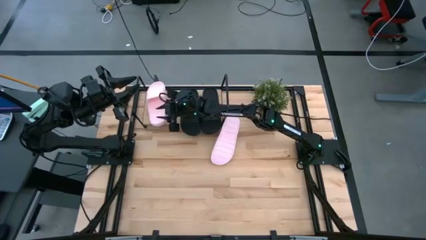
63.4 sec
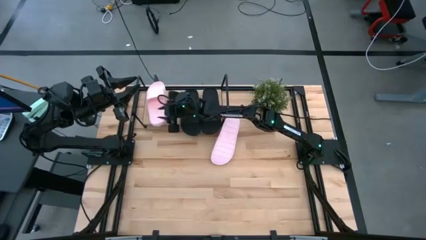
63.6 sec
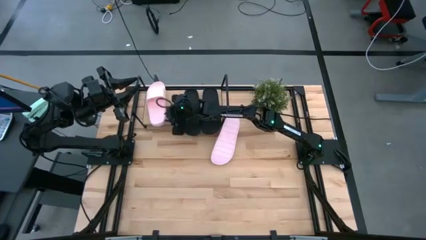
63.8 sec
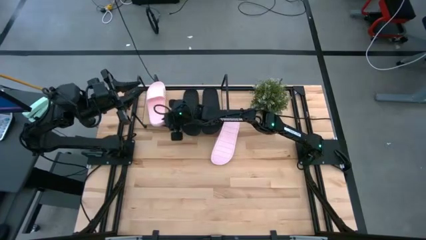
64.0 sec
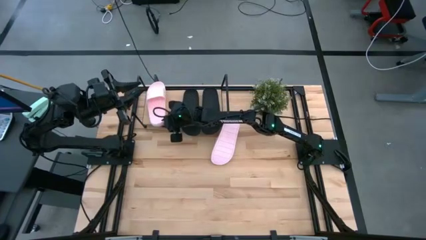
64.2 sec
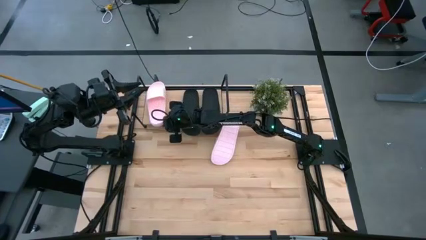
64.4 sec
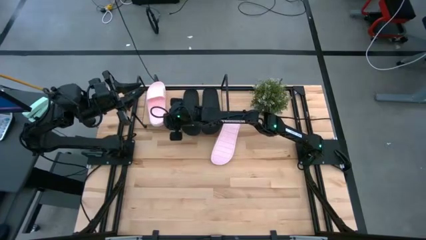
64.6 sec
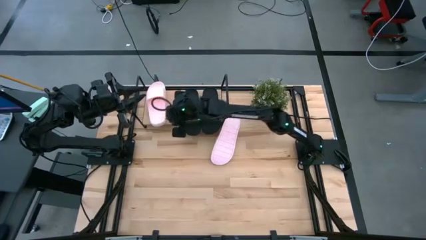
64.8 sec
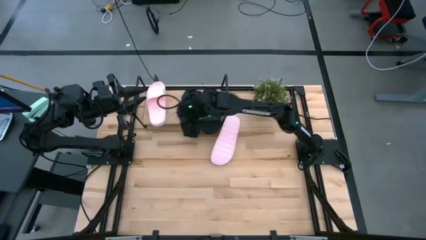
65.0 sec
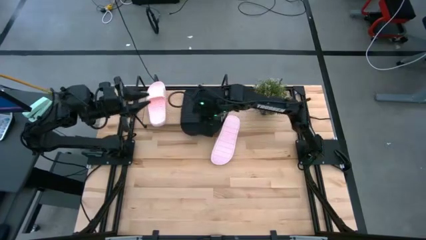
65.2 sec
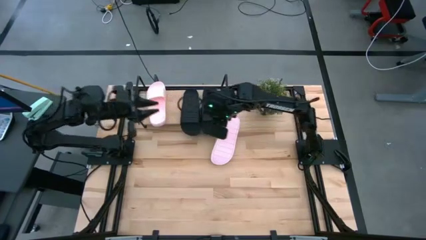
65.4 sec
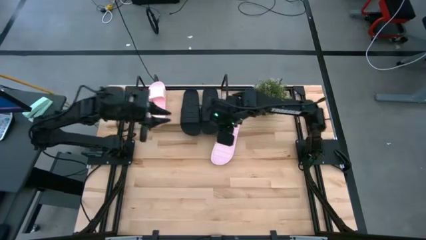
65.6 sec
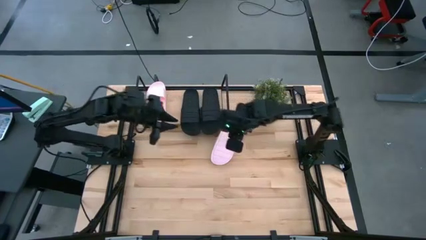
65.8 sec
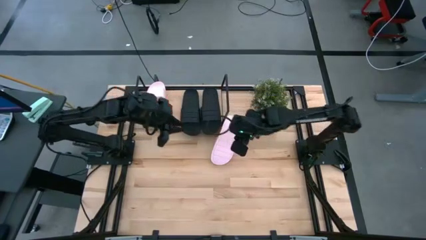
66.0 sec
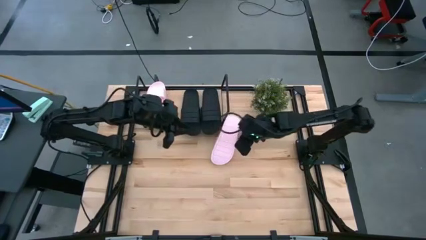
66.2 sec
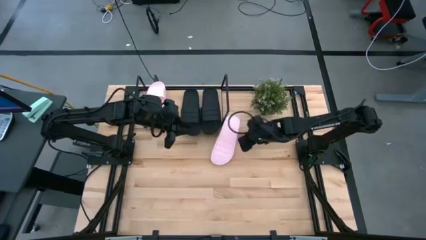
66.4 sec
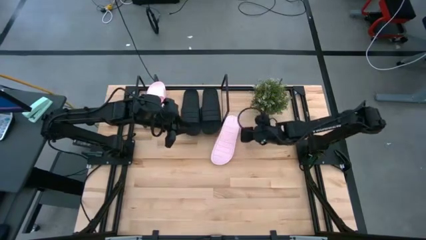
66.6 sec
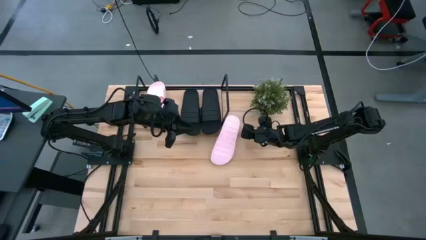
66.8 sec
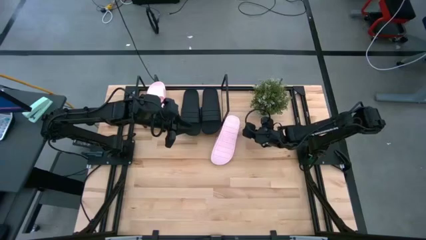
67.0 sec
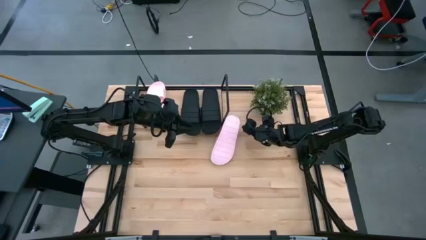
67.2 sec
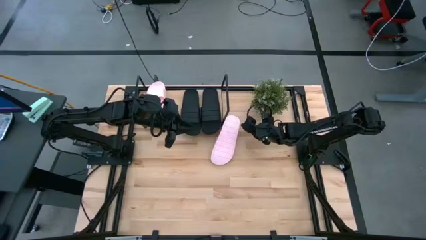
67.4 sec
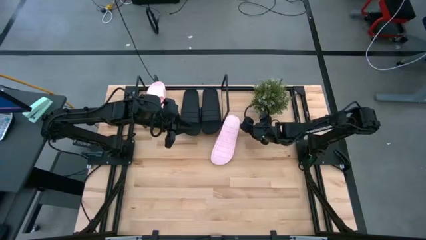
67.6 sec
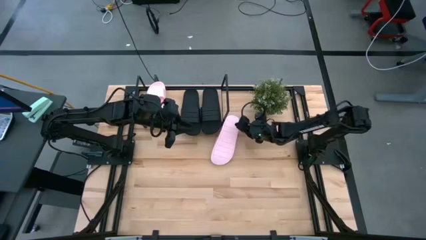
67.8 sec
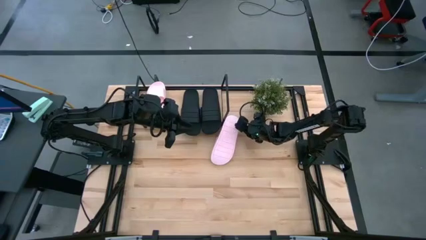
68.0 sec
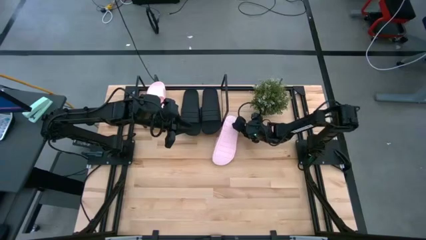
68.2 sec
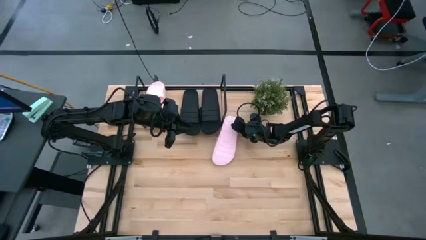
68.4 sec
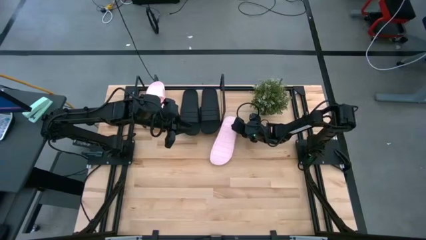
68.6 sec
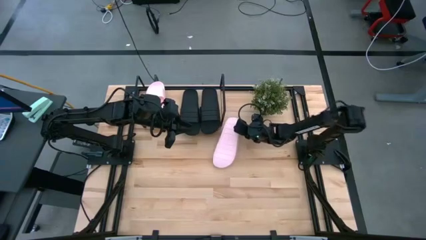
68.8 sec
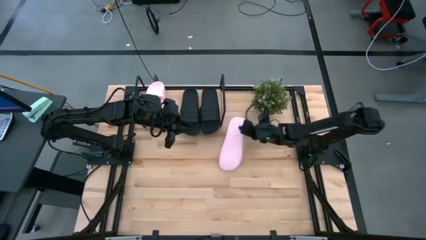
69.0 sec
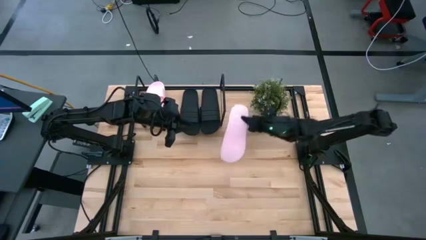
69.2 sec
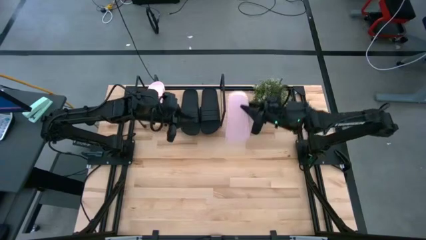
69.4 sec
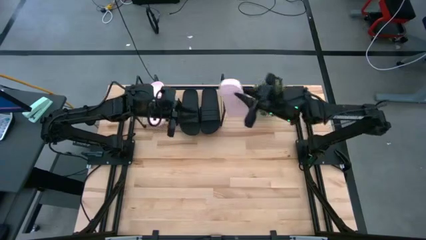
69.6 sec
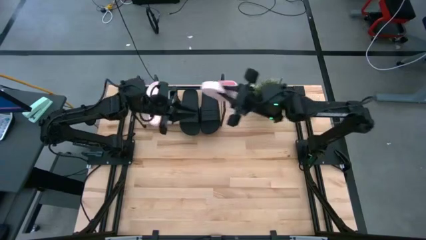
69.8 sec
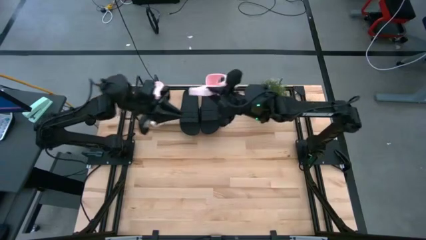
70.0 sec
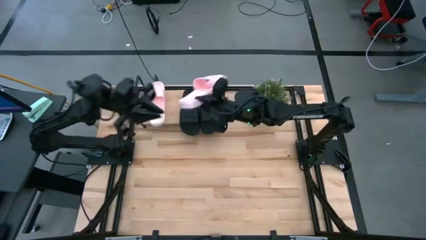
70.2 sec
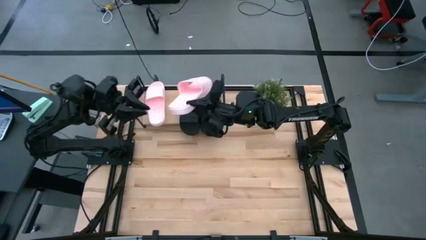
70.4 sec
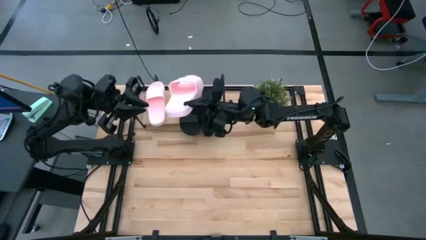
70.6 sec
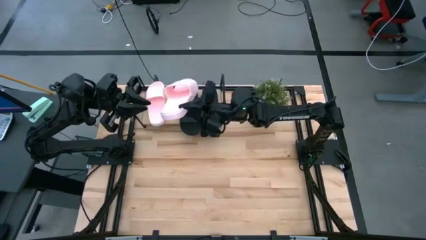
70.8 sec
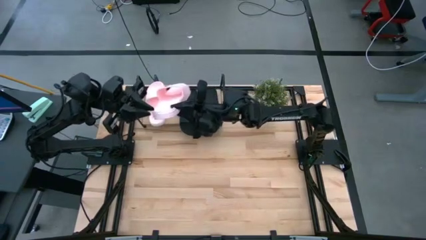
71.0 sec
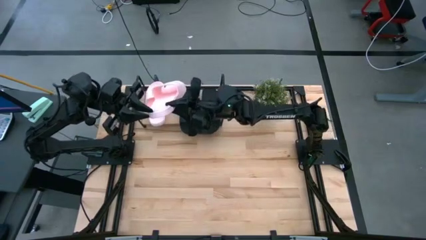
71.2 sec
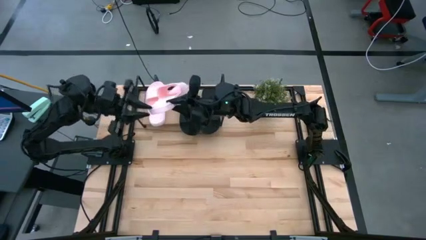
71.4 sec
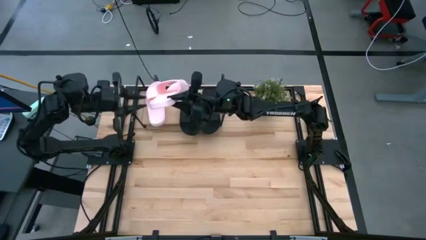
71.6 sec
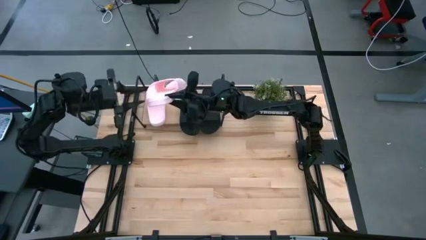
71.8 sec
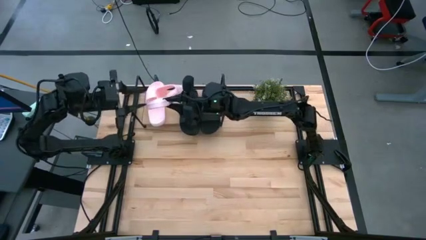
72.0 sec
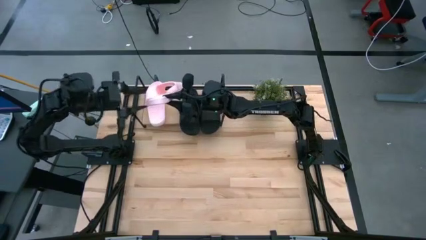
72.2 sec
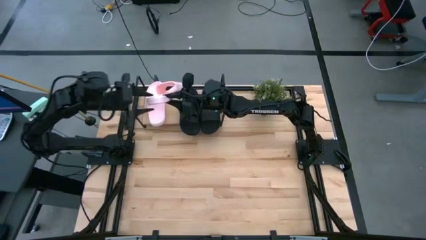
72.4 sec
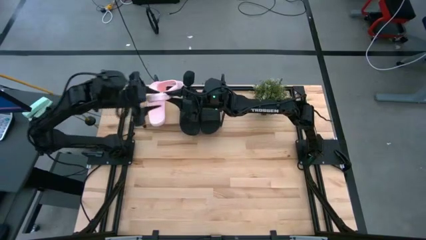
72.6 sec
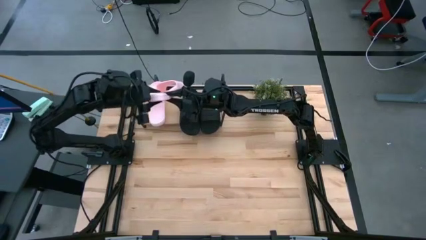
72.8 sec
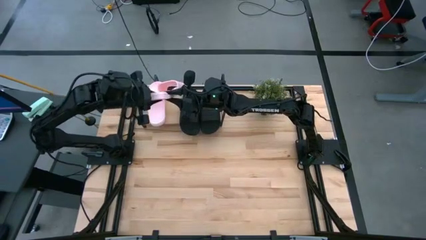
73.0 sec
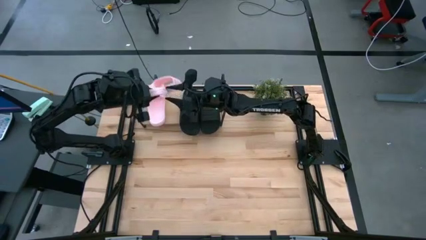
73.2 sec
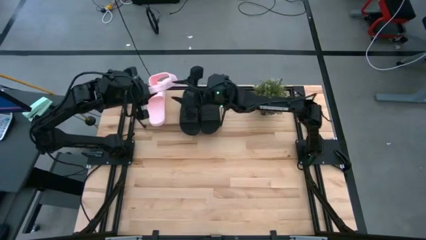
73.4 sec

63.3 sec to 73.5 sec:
Task: Pick and place slides into the shelf
Put the pink slipper onto the shelf
